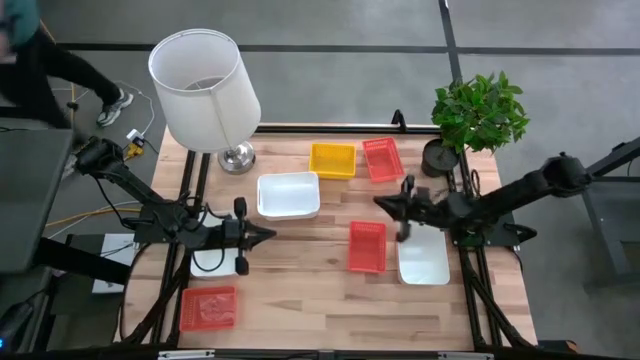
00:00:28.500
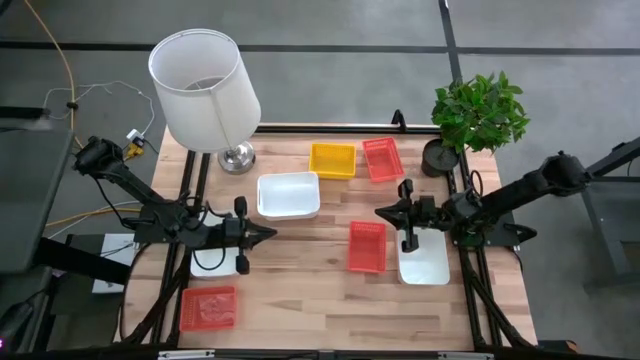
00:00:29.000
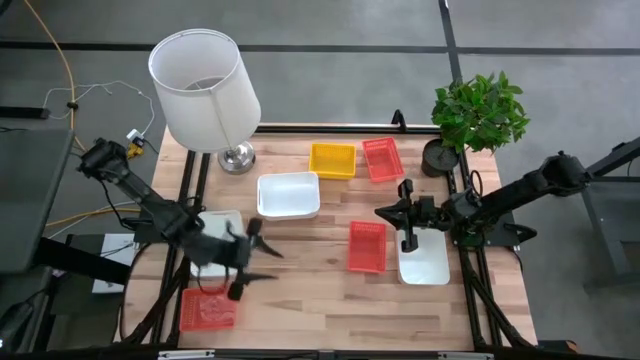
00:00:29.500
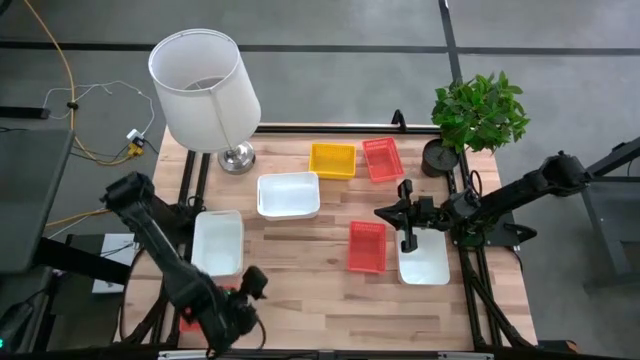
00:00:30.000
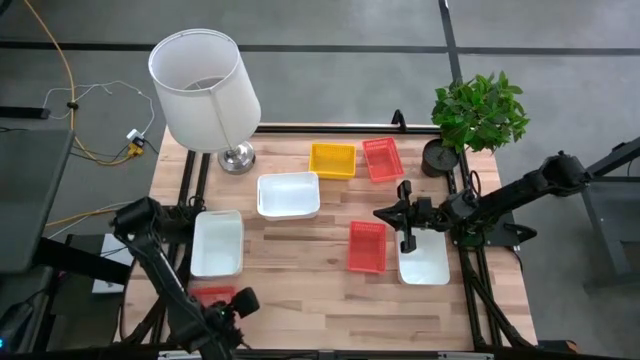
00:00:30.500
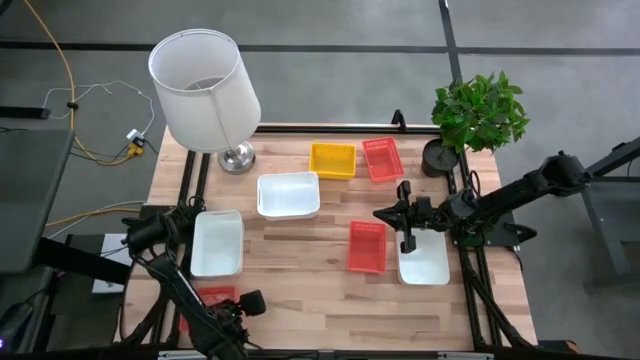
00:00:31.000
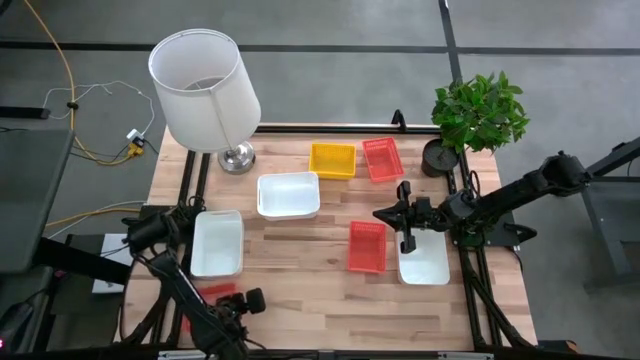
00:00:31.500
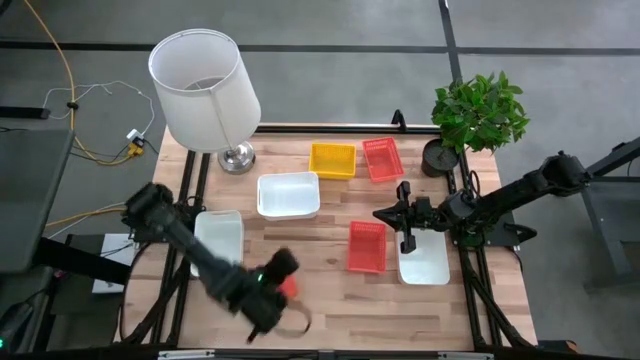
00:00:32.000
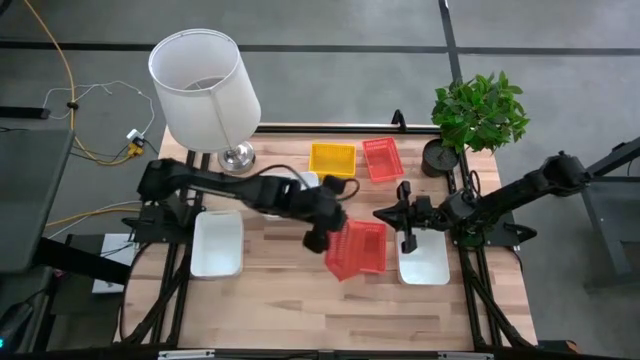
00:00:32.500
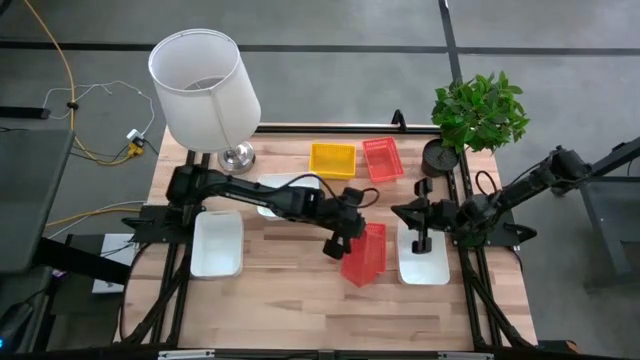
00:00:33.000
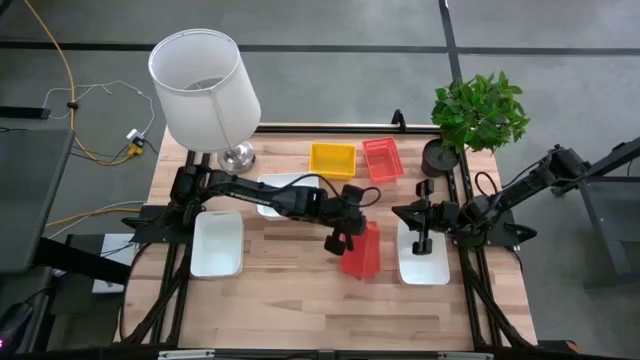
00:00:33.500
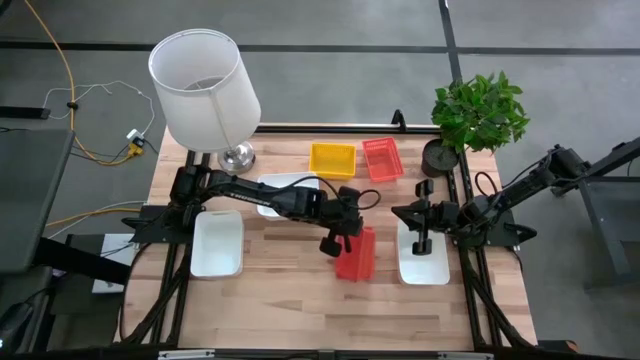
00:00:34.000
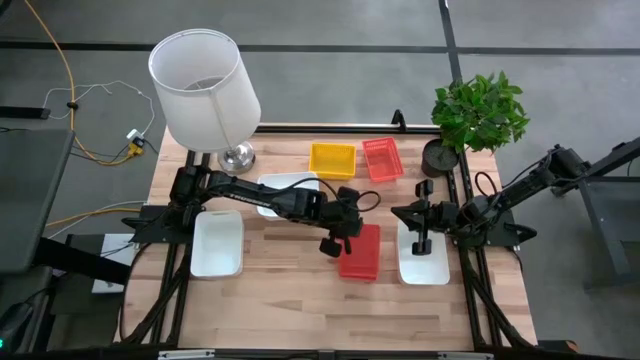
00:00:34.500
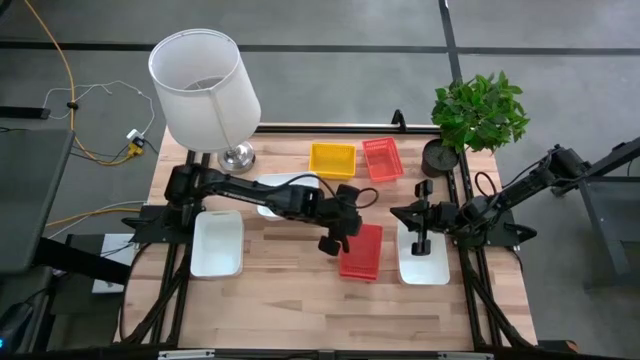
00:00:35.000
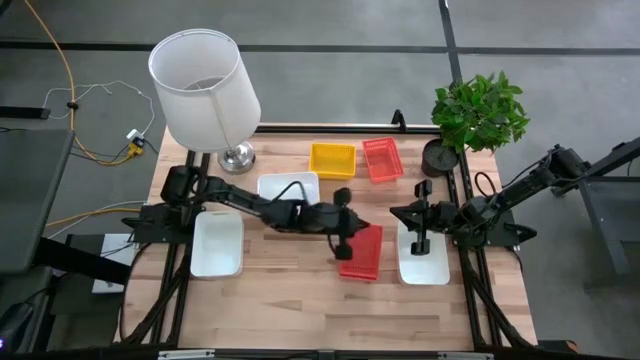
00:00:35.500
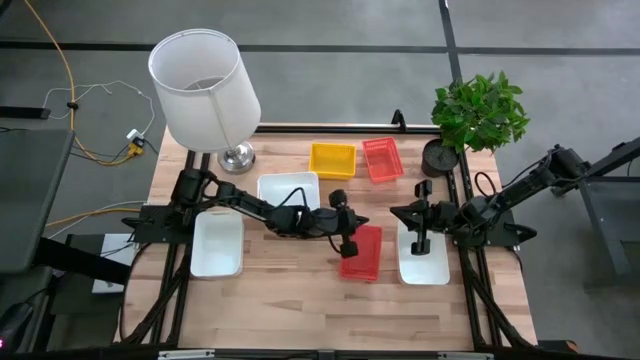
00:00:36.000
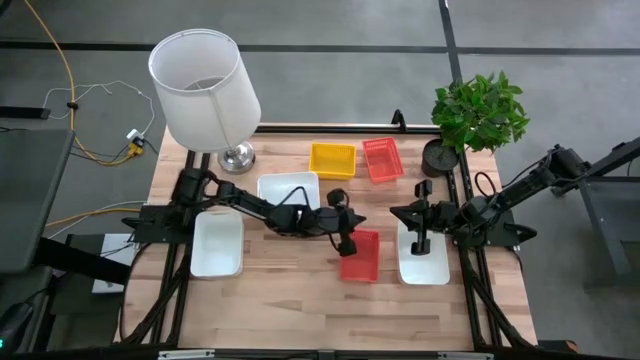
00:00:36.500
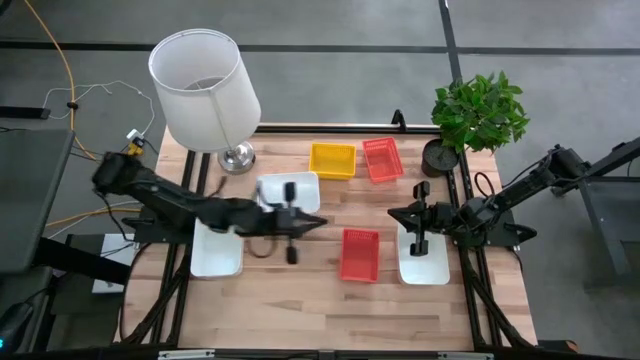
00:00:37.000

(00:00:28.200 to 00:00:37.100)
Stack the bottom left orange bin on the middle orange bin

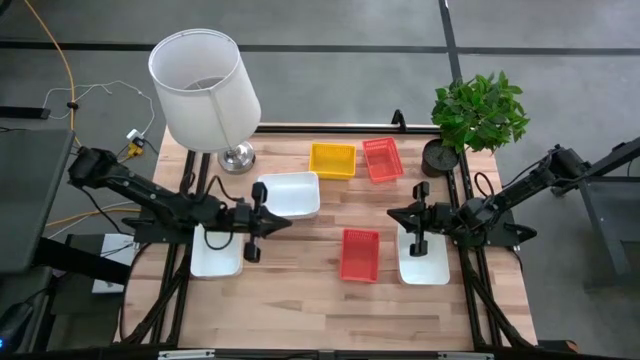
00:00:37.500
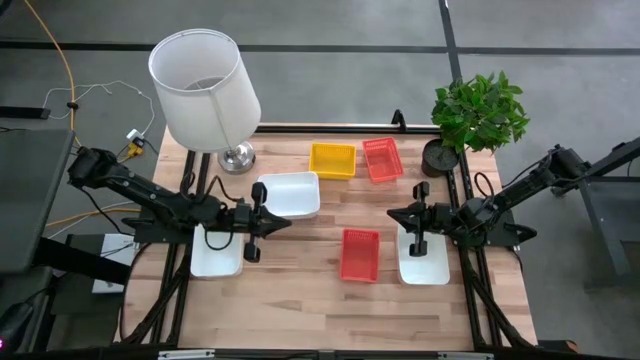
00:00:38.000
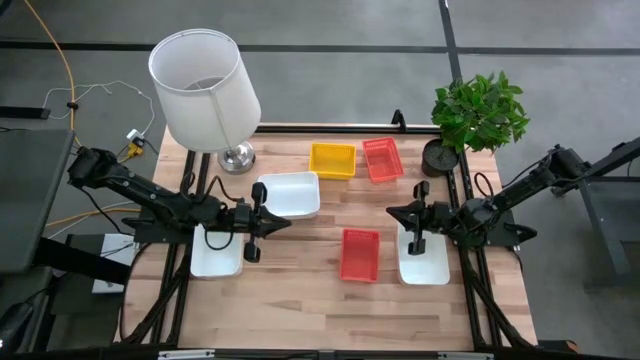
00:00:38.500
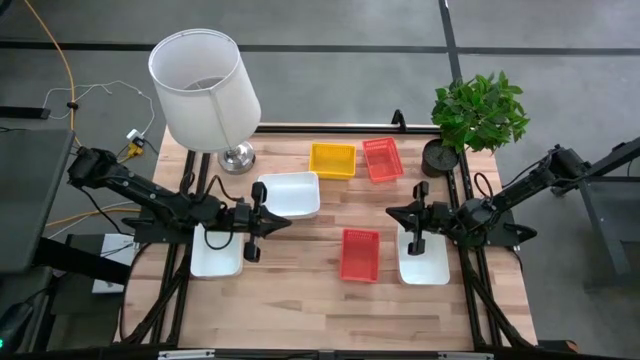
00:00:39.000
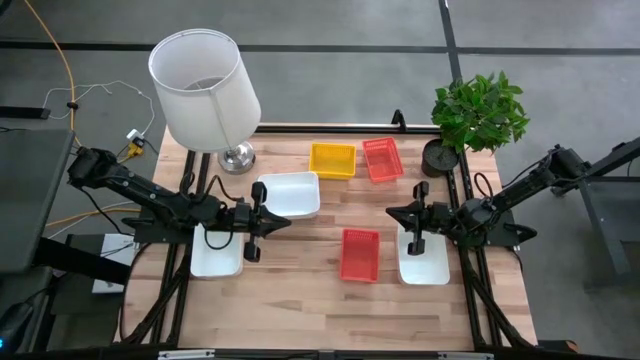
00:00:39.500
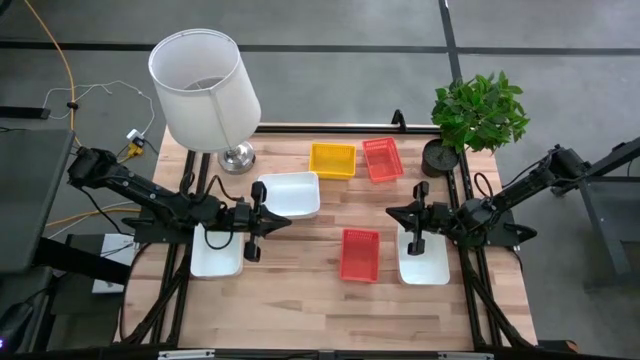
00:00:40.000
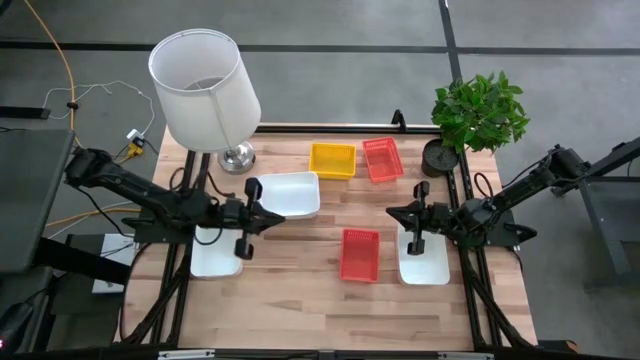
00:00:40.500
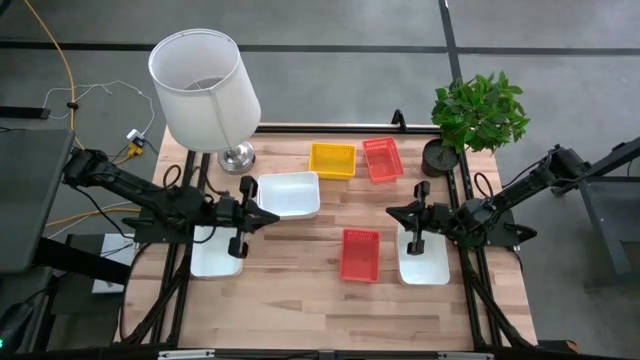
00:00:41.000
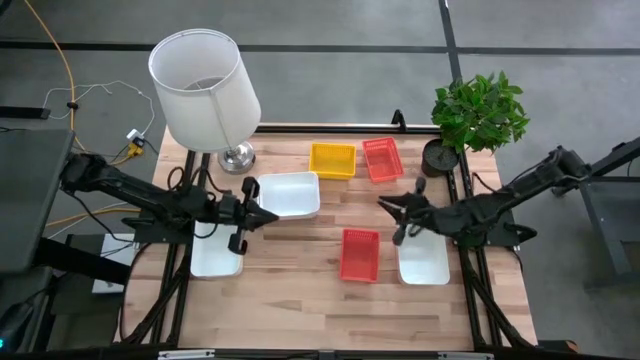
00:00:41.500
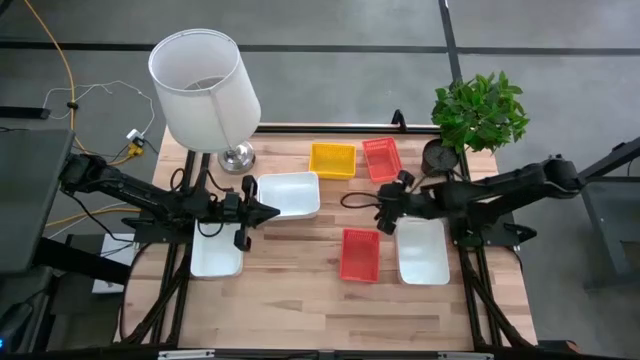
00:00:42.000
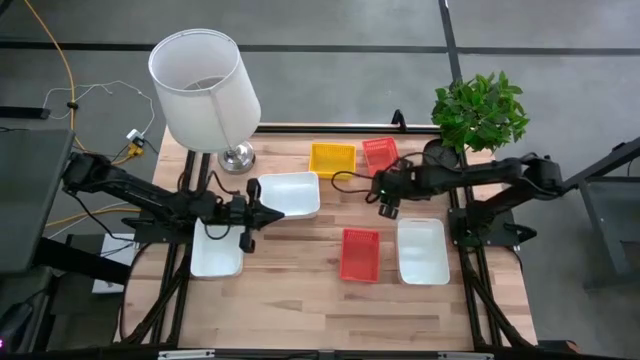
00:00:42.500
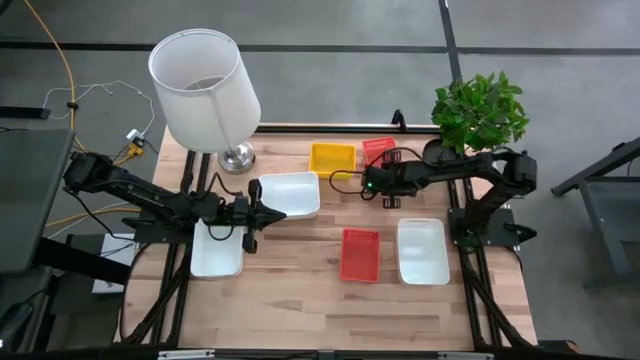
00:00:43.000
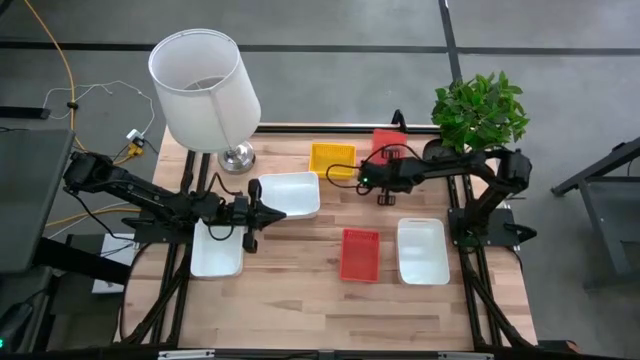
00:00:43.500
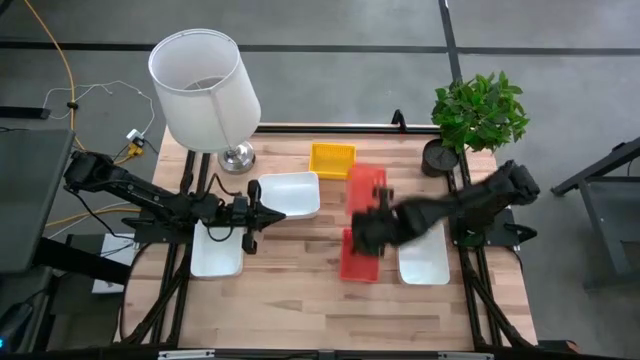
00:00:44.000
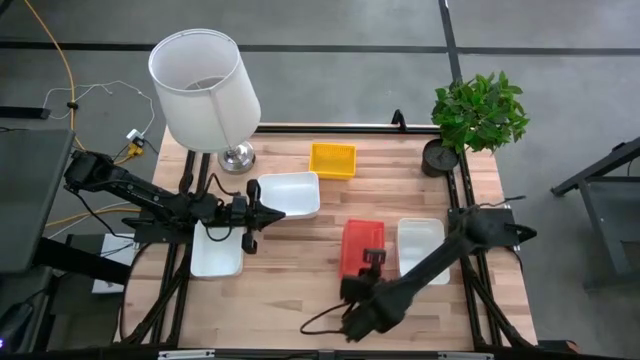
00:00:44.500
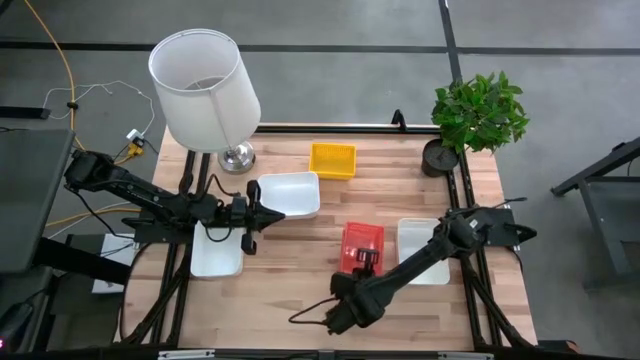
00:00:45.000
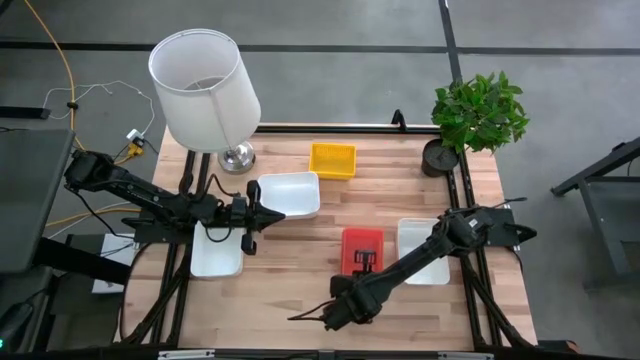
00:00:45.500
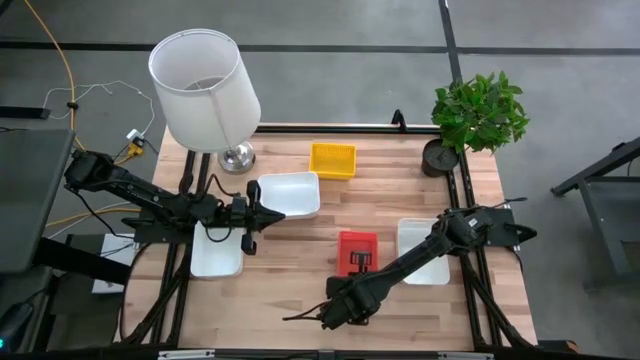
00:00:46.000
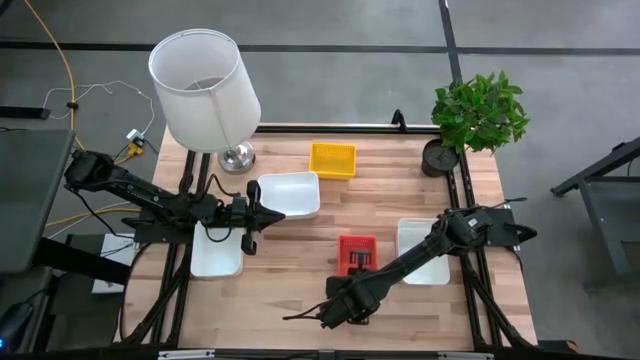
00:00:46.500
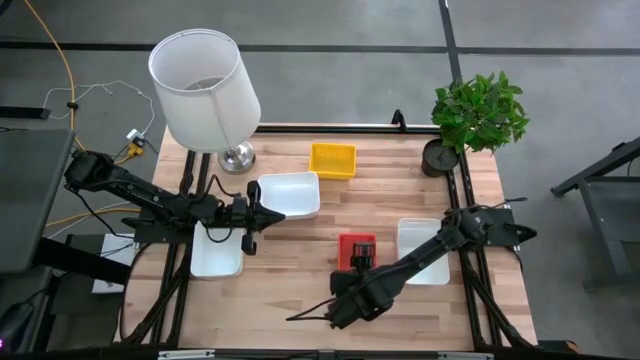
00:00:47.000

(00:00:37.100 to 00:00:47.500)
Stack the top orange bin on the bottom orange bin
